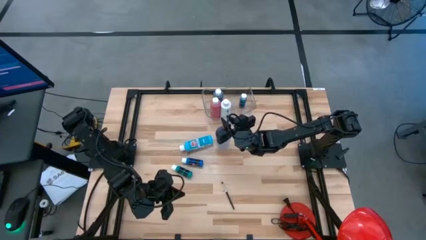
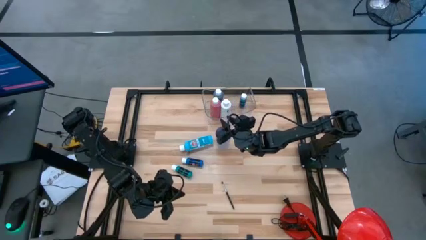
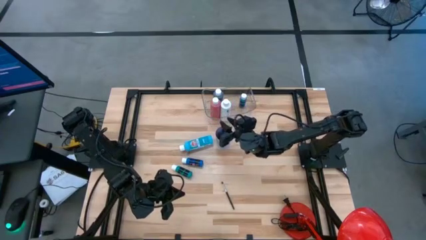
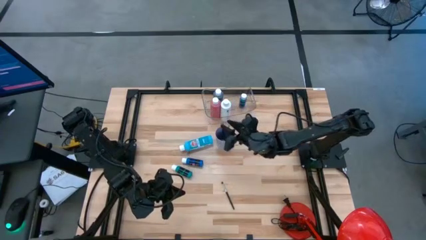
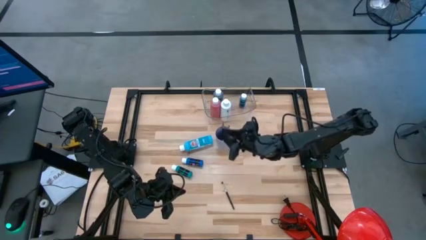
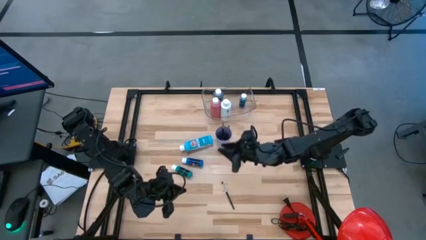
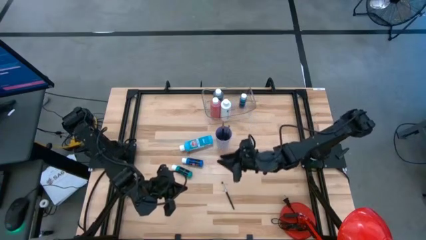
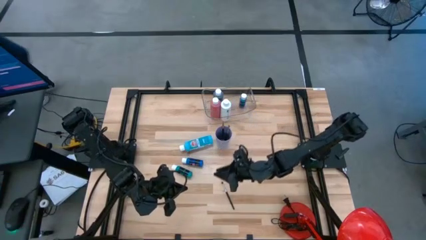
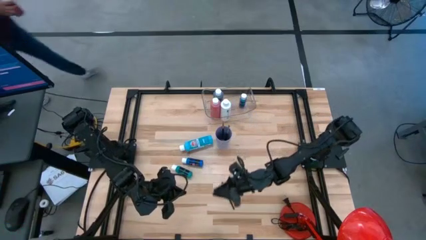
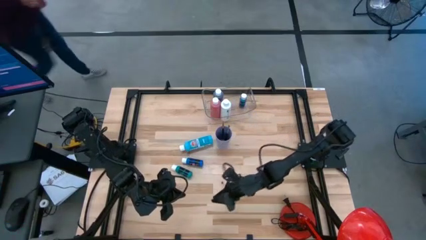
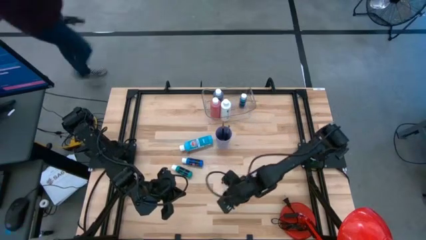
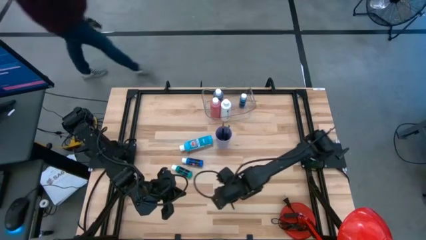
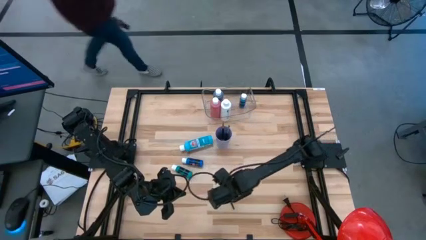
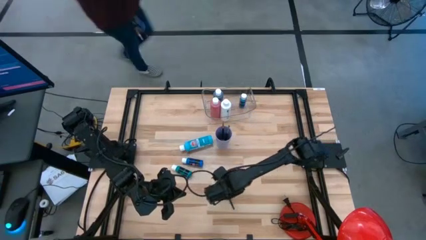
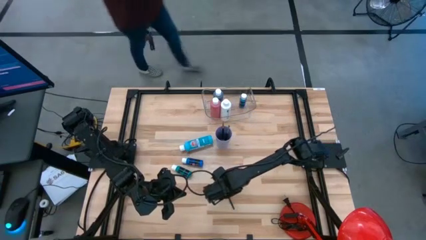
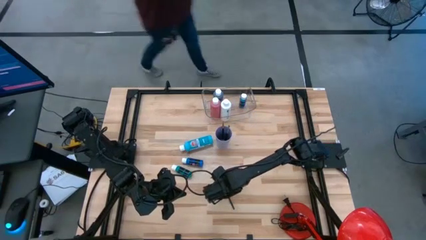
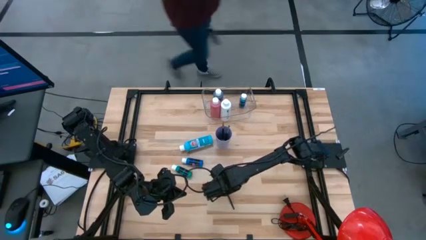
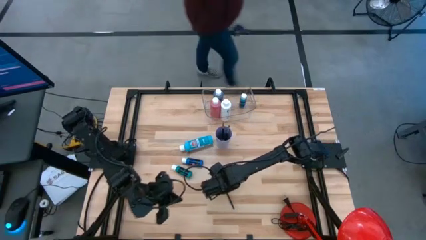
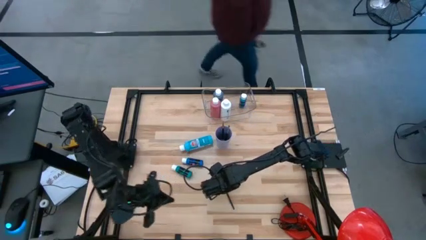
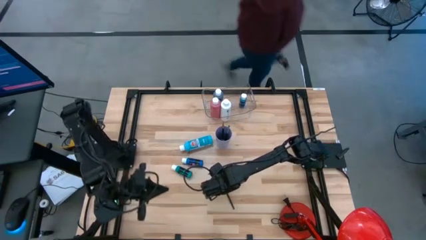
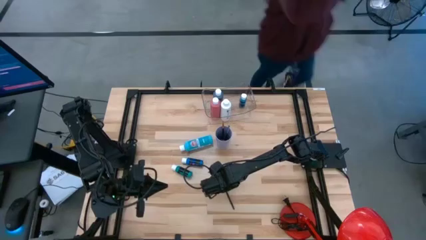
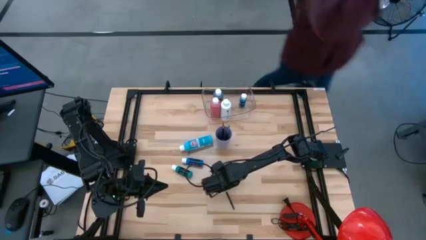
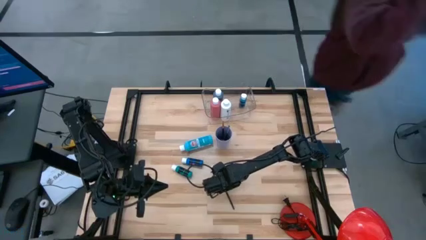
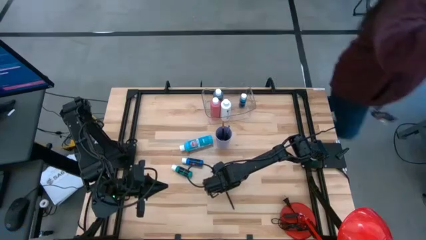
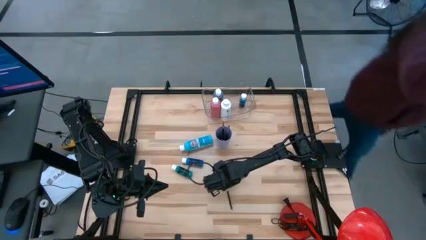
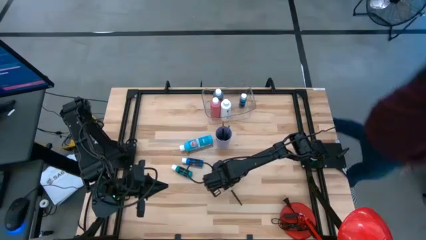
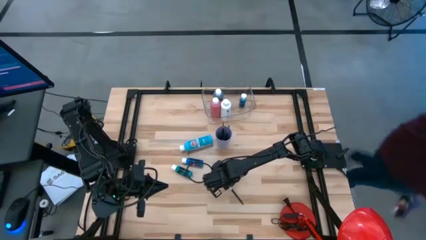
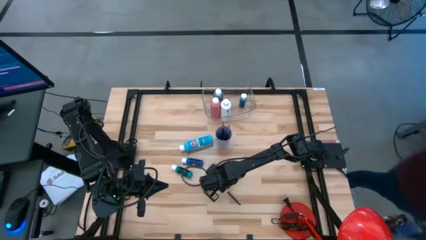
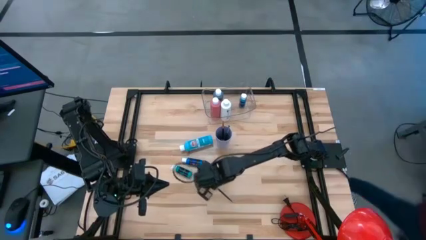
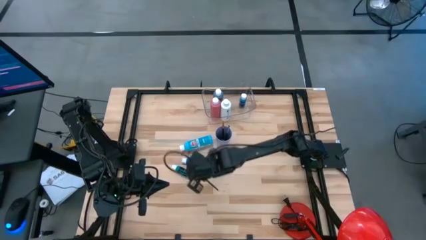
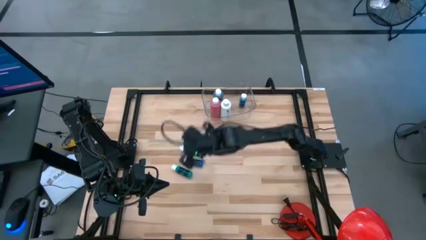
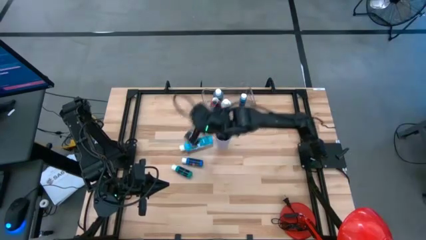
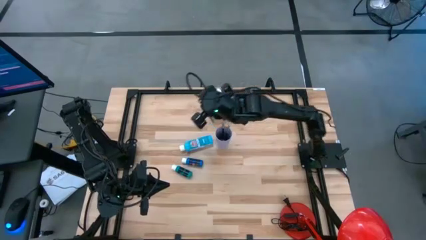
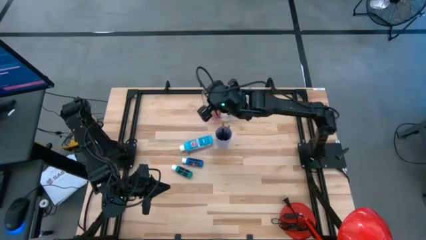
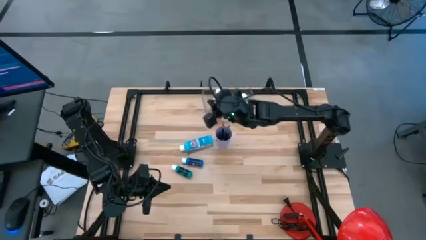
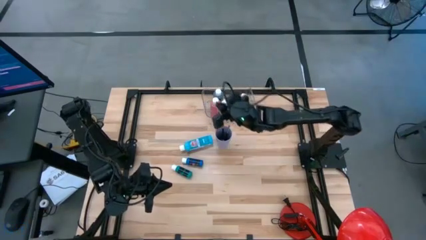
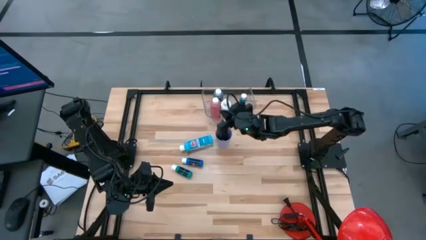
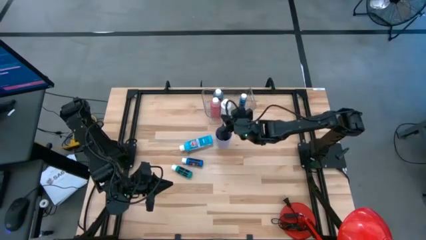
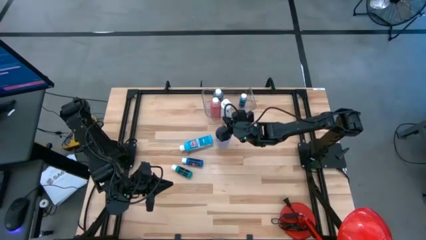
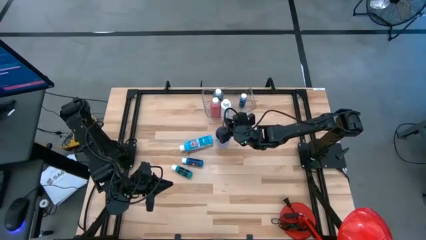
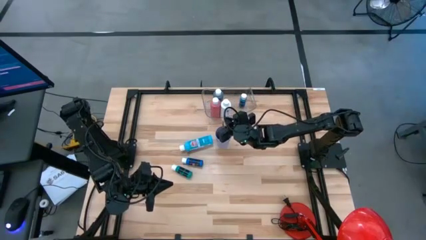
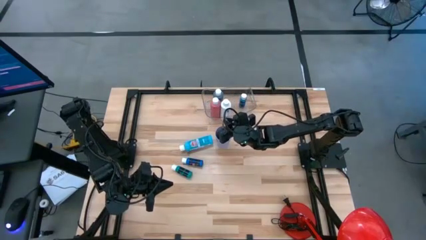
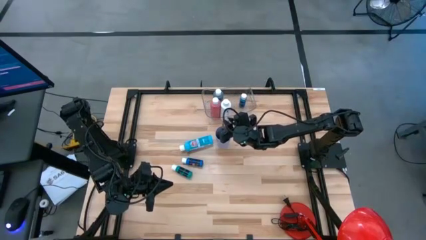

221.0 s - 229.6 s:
Task: Pick & Place Paint Supplies
Put the black paint brush into the violet cup

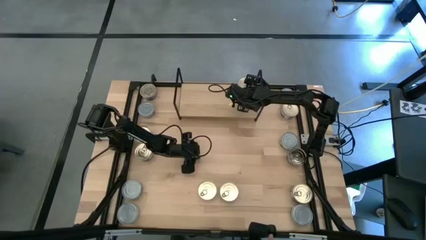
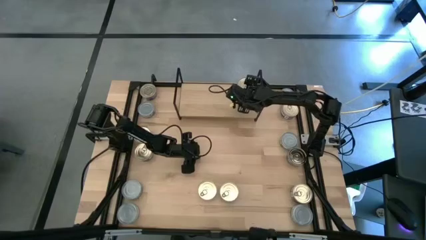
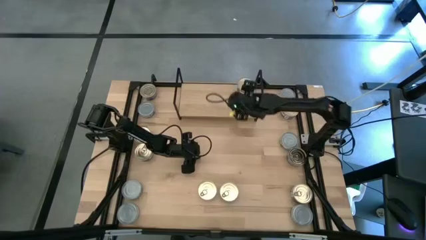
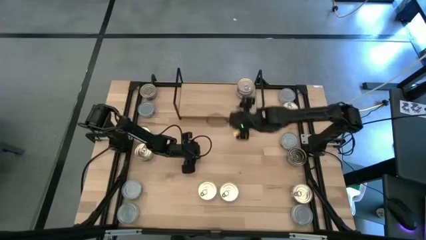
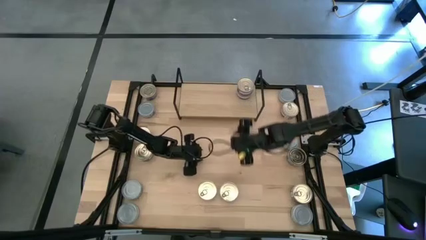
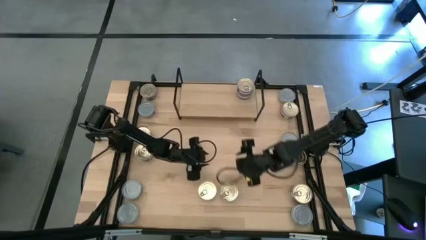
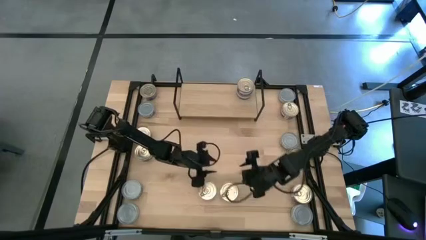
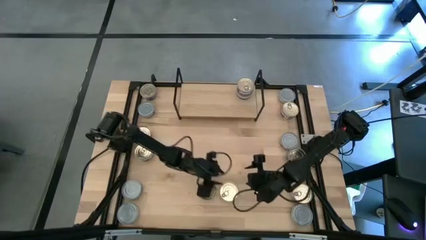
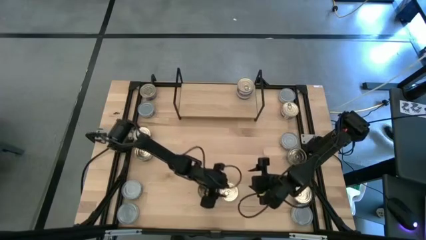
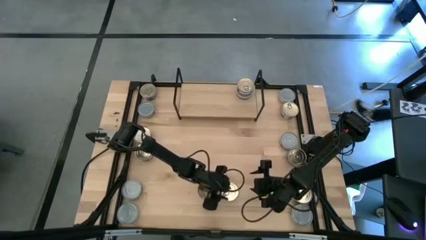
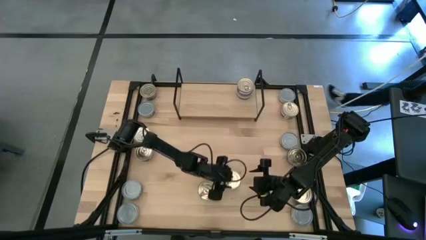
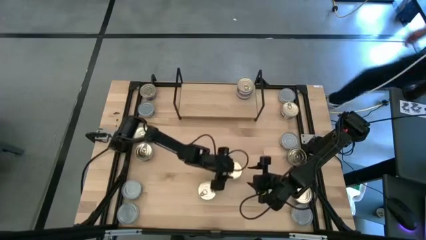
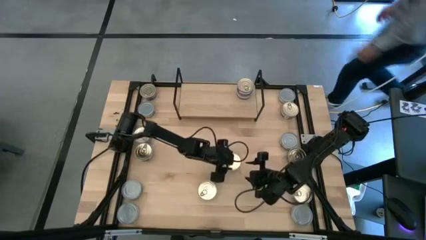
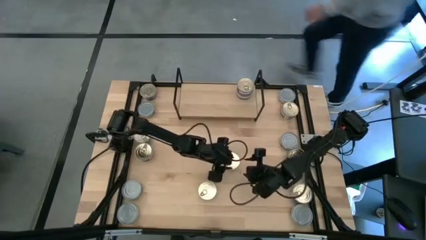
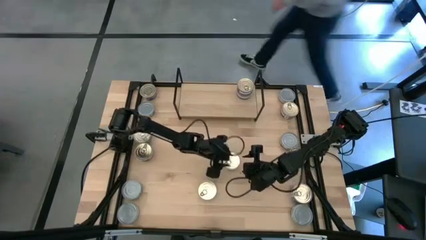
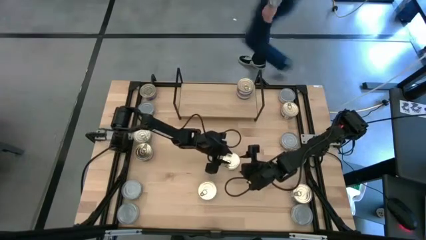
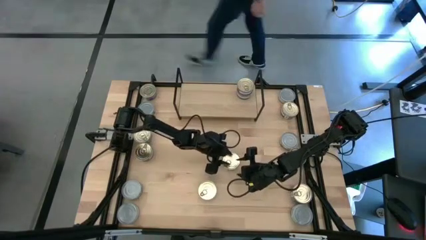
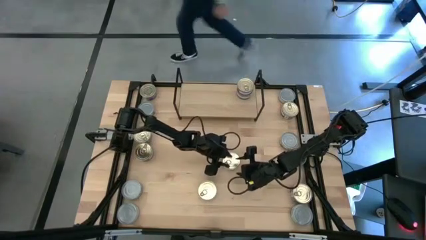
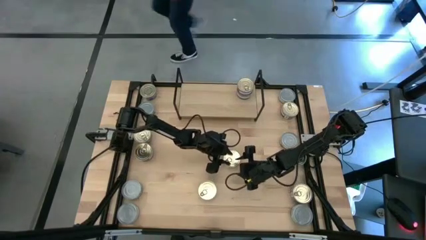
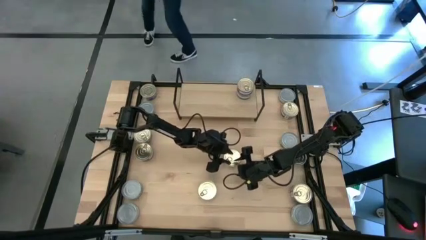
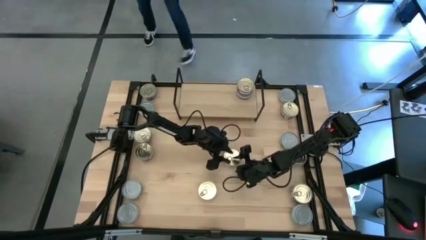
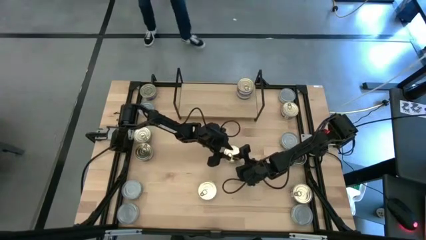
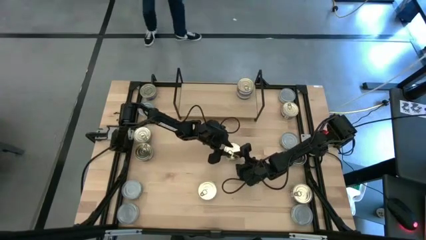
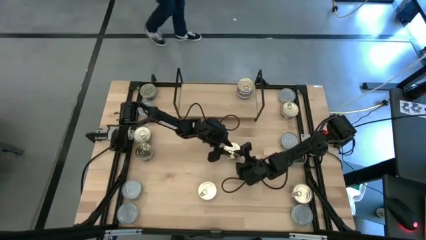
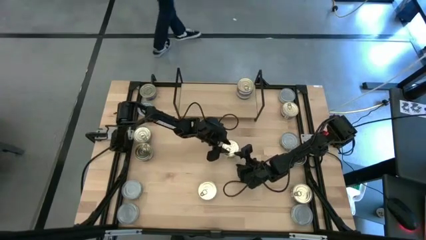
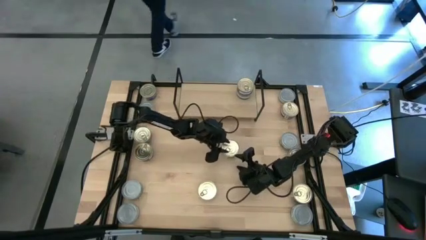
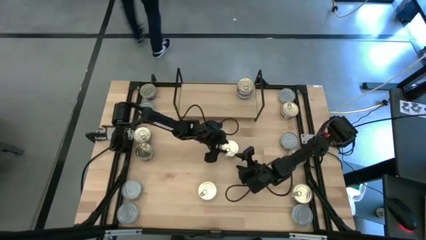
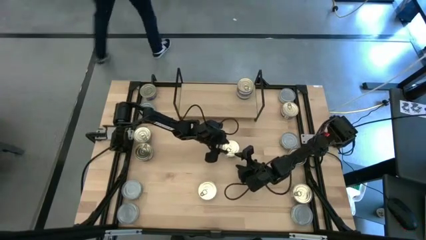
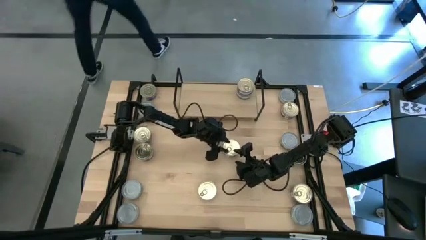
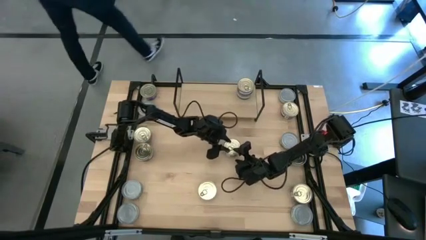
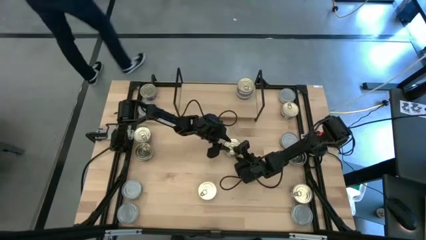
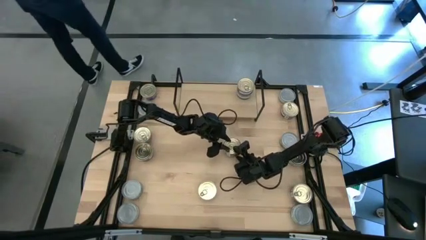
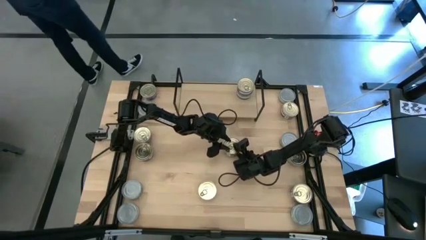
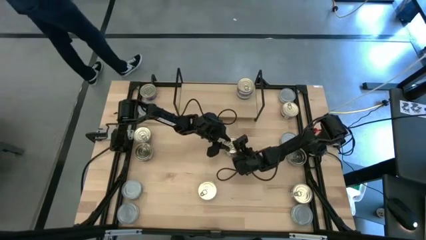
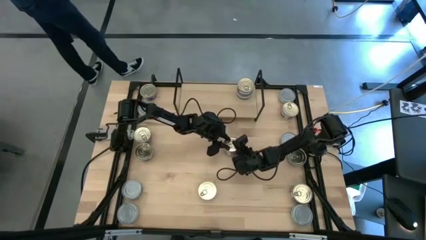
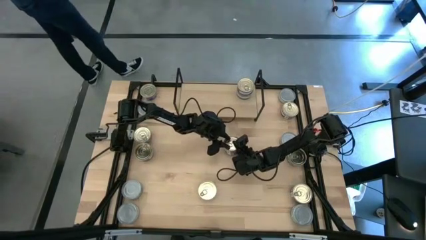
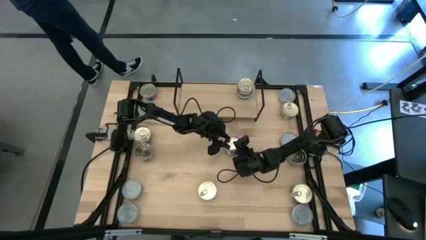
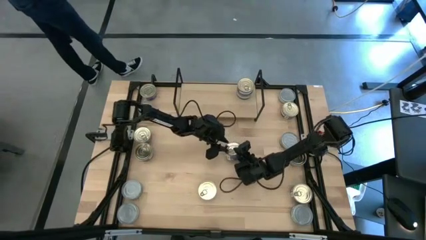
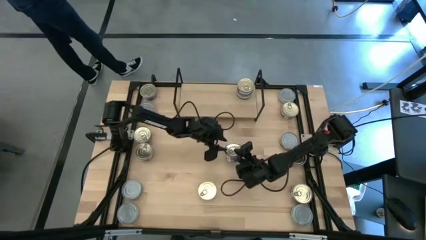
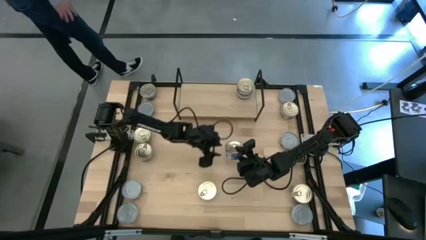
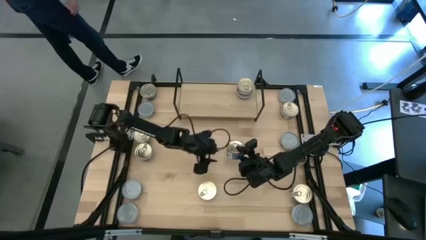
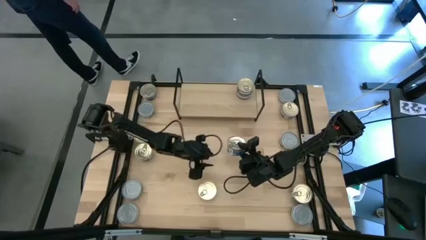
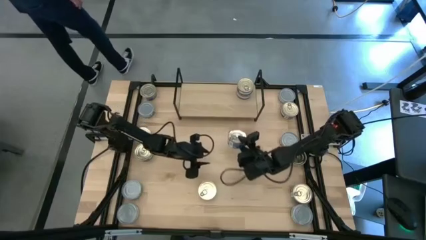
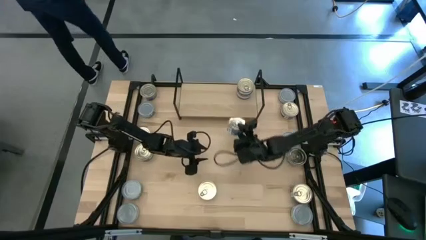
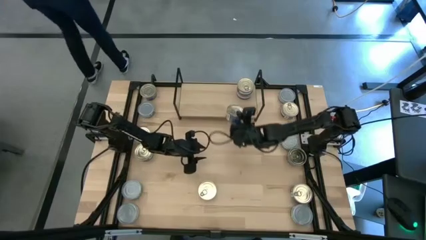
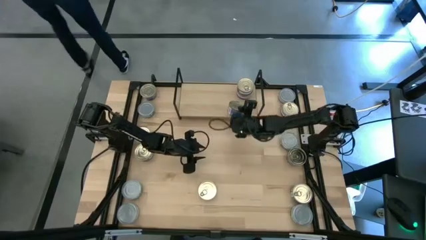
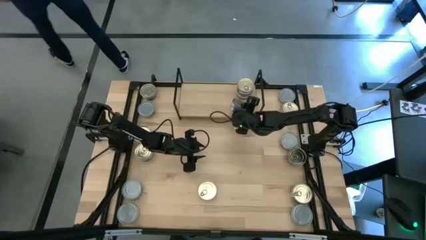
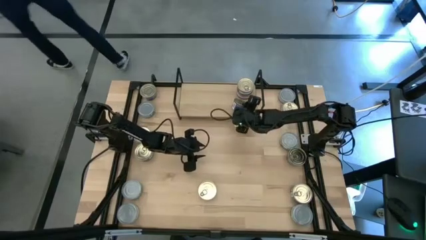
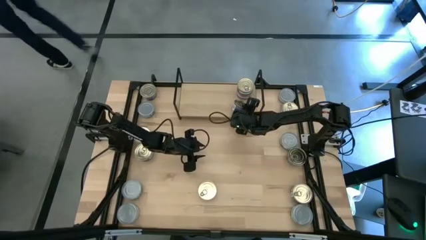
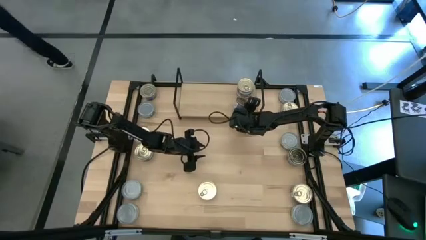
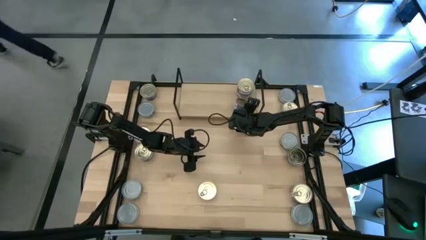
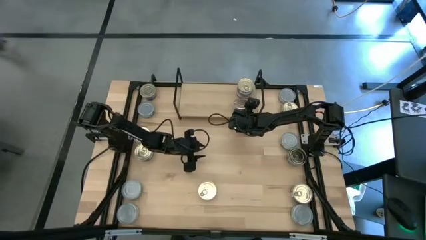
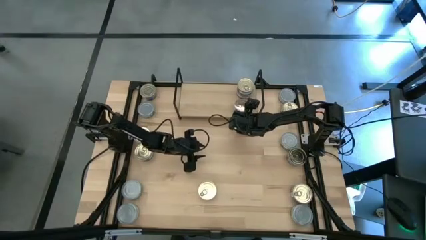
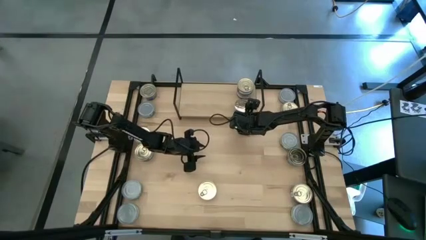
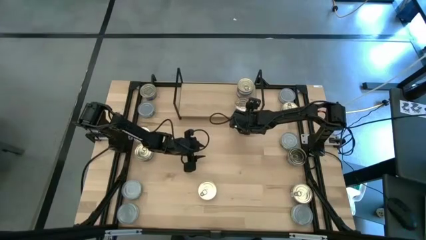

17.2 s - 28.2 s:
Task: Stack canned seafood by type on shelf
Put the blue and pink tuna can on the shelf aligned with the other blue and pink tuna cans
